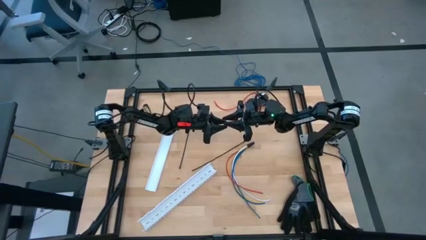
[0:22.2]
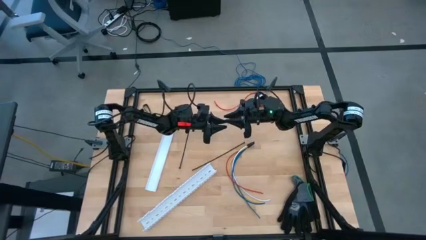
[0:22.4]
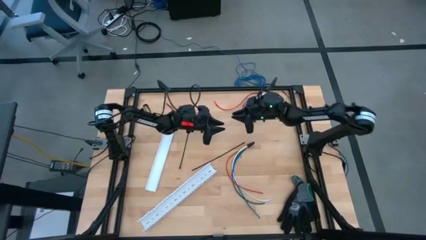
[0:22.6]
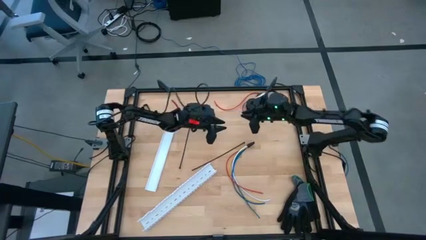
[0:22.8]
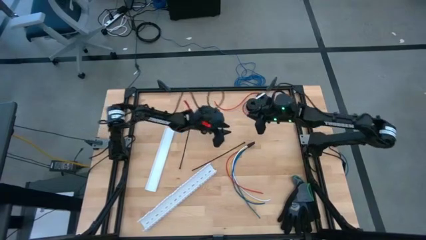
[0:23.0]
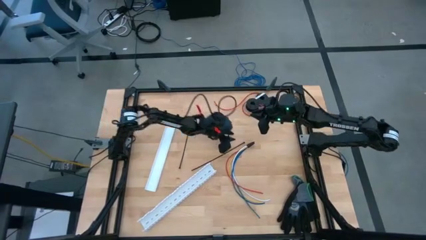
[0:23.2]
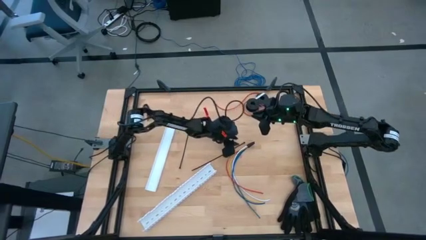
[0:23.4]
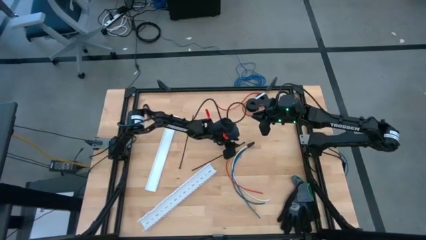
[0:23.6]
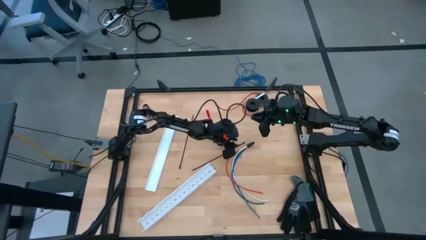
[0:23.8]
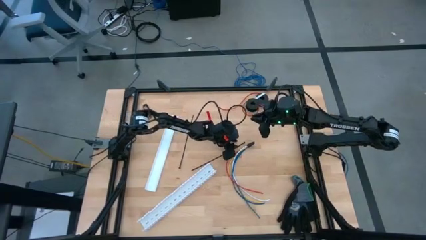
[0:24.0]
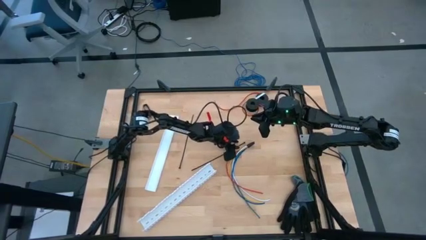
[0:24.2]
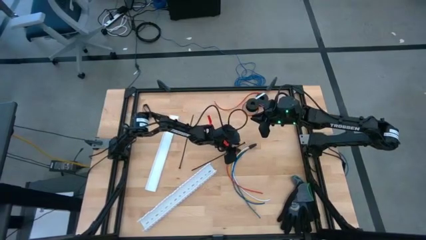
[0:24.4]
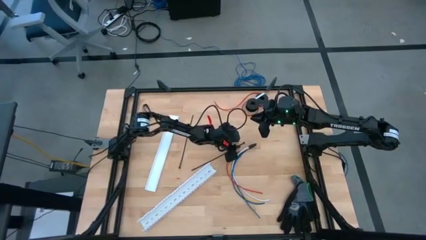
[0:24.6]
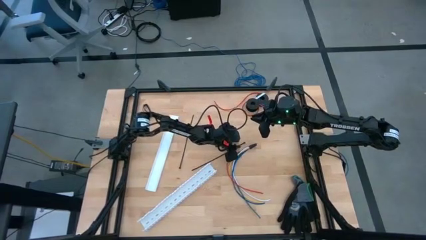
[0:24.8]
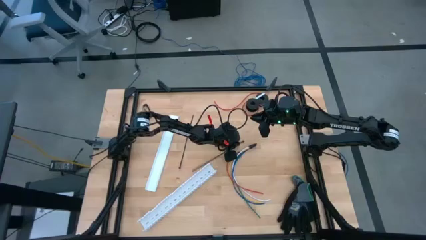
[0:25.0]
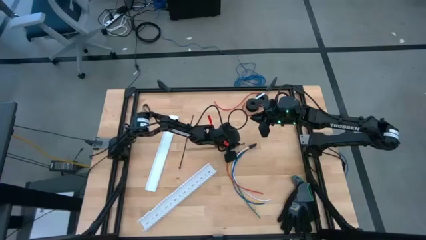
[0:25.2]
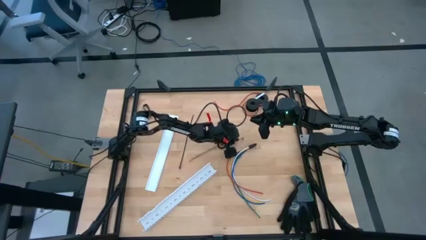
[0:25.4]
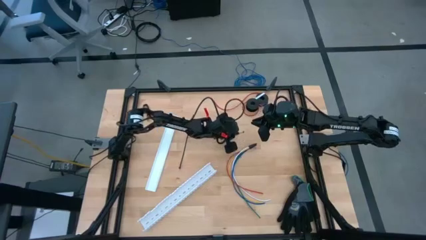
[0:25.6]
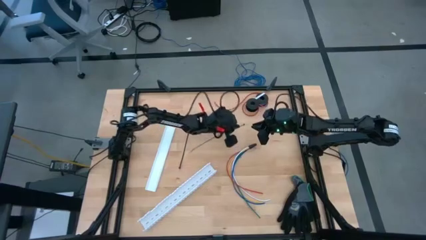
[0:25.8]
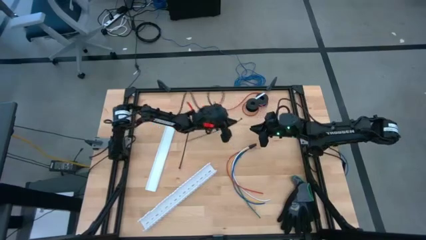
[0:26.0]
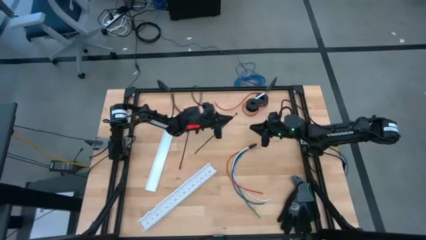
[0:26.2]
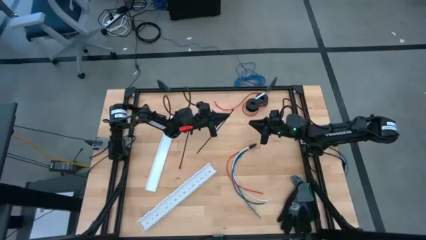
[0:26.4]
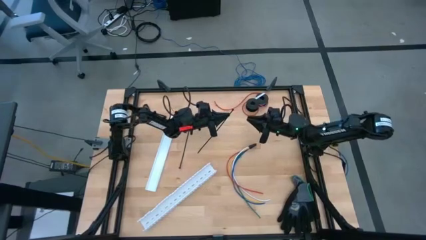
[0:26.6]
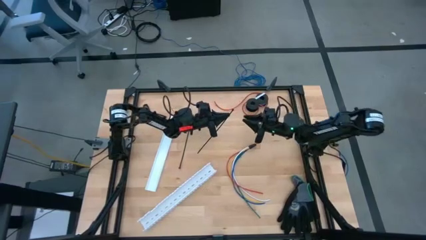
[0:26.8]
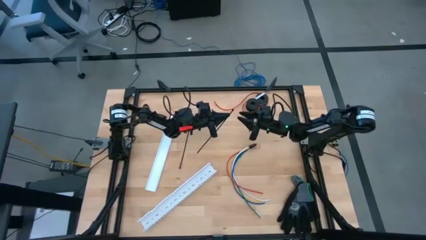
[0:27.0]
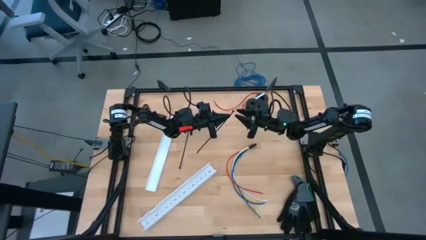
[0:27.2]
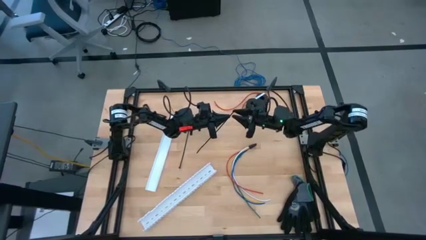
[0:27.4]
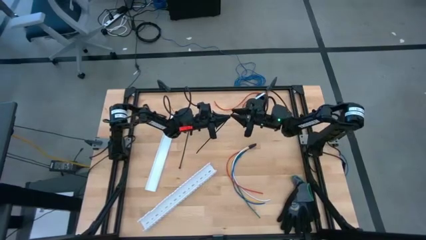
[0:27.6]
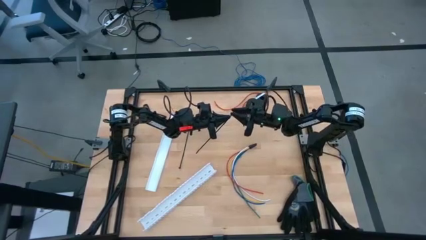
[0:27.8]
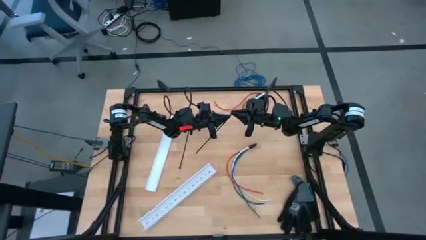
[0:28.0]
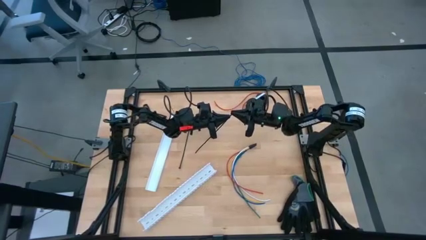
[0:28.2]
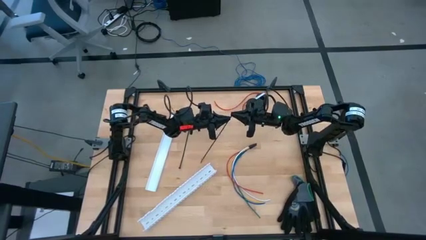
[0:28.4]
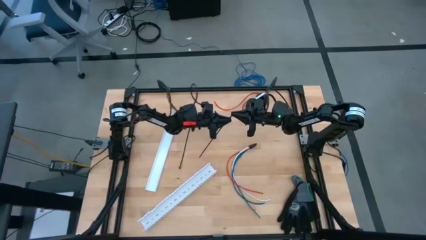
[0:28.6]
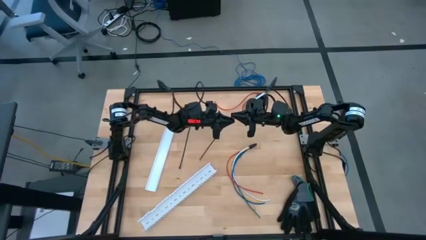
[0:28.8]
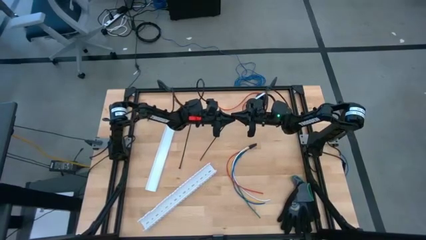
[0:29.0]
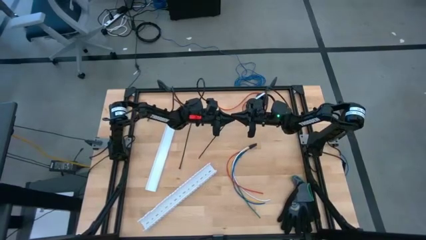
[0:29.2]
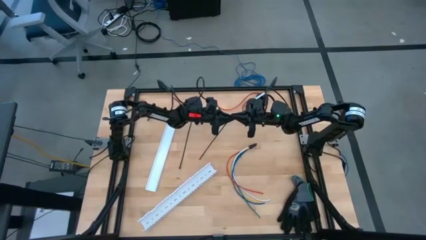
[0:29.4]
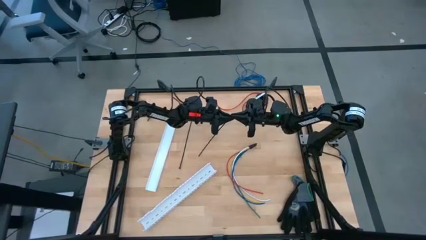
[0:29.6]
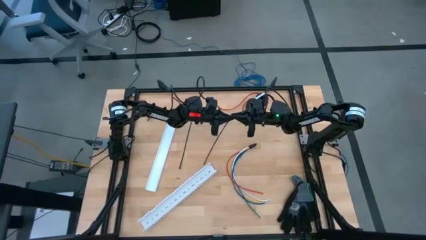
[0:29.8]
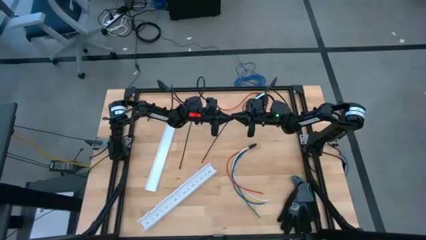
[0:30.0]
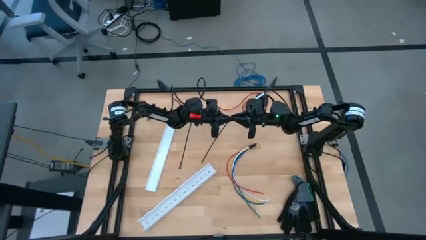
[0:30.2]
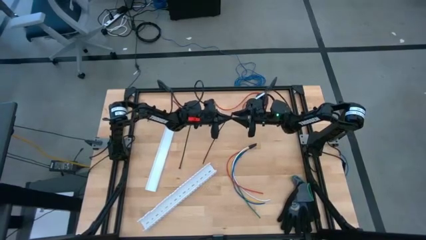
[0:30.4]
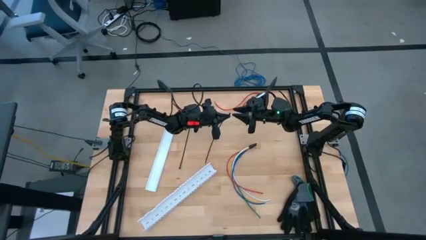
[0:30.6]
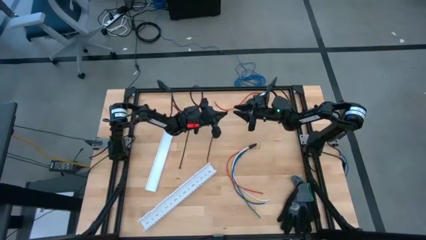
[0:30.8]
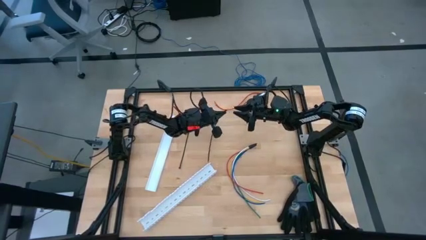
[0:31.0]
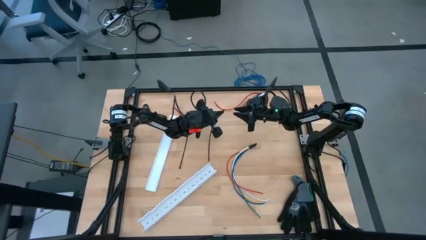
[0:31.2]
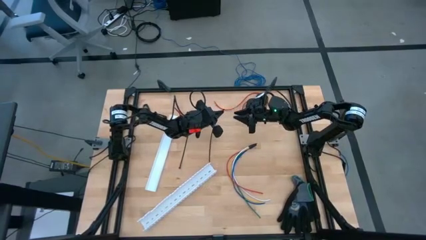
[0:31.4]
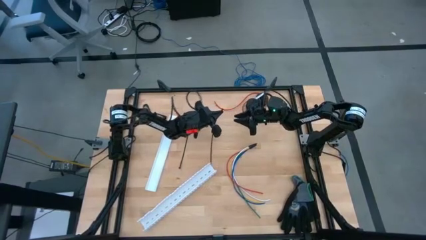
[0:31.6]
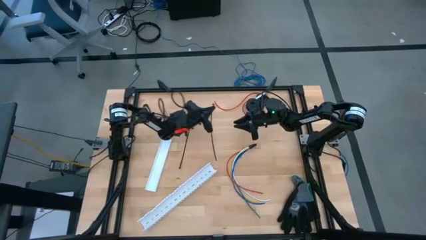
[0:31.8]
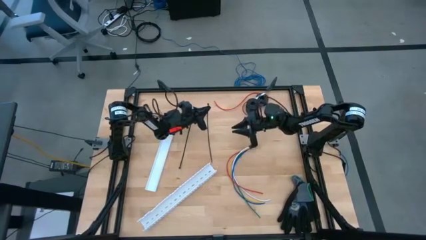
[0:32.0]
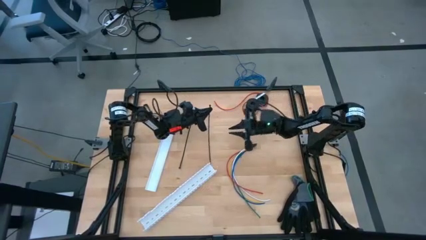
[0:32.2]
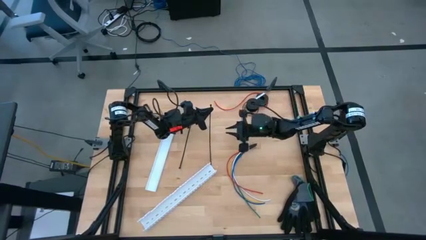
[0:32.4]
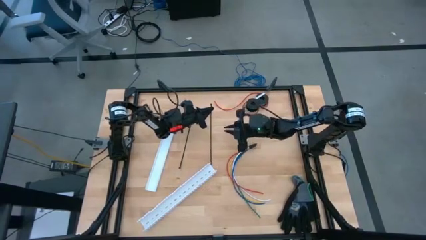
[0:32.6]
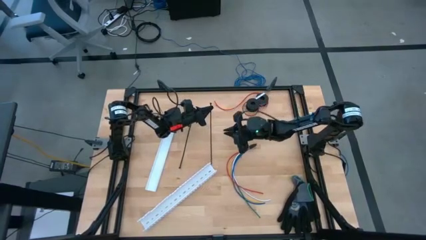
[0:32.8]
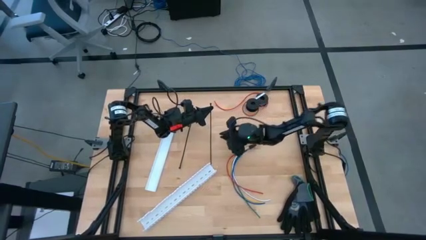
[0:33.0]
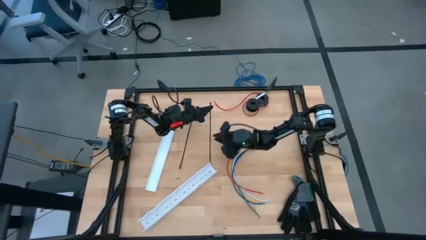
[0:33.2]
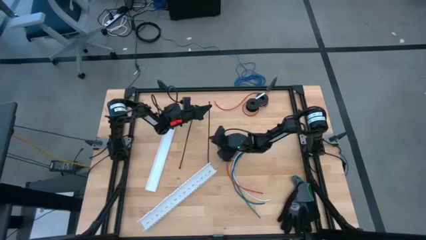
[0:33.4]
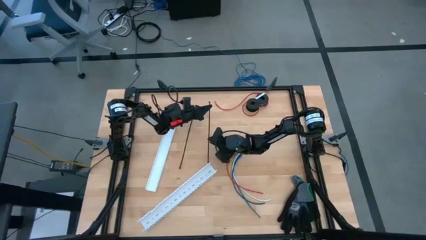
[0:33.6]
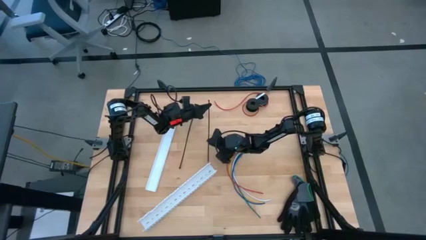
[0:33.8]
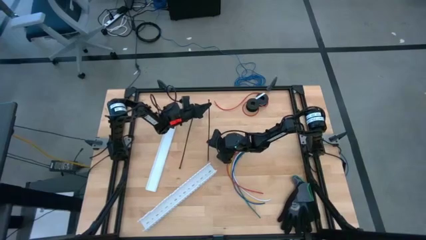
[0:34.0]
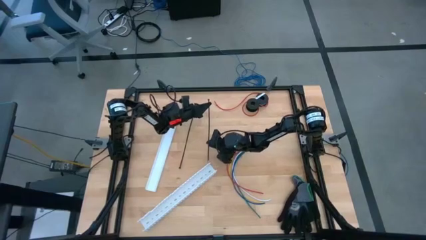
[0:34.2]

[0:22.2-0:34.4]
Task: Ziptie cables
Wrap the right black zip tie
